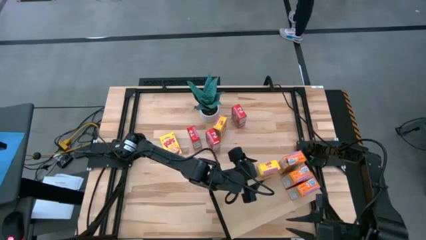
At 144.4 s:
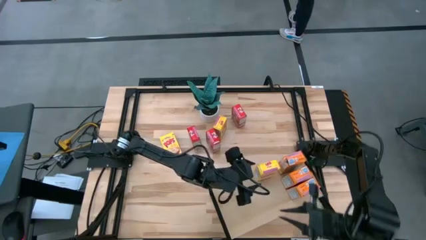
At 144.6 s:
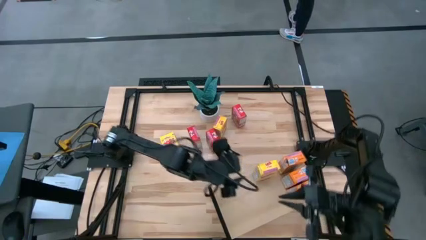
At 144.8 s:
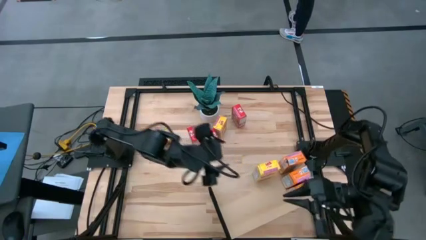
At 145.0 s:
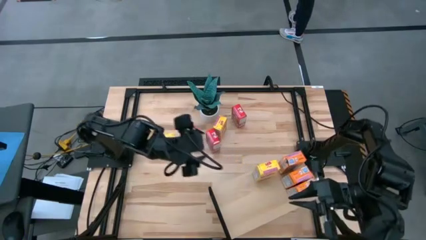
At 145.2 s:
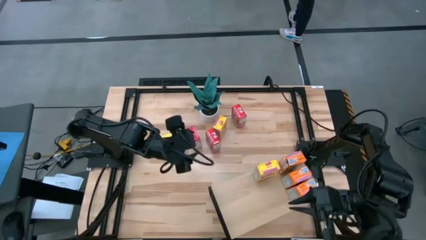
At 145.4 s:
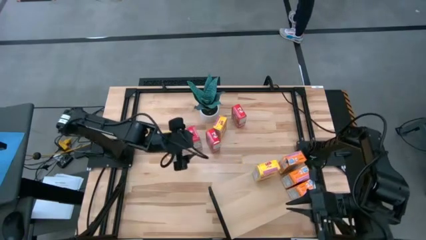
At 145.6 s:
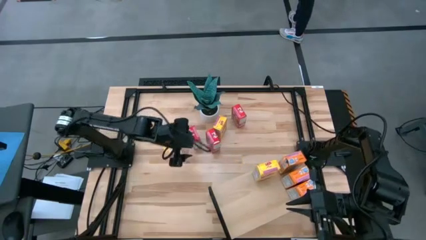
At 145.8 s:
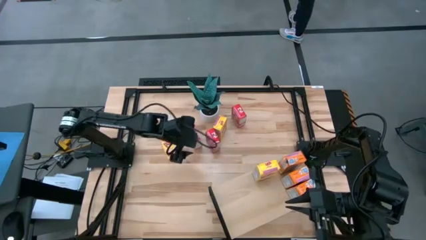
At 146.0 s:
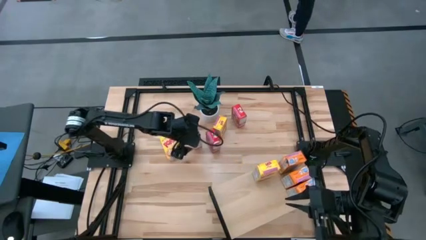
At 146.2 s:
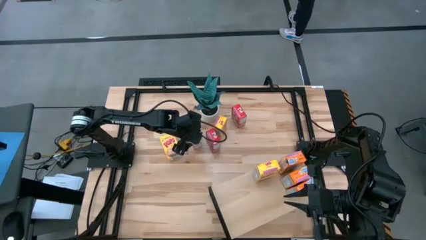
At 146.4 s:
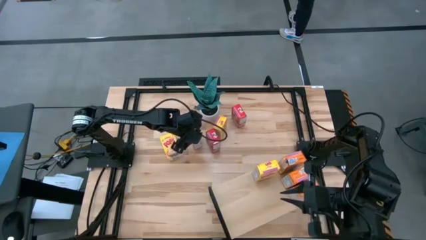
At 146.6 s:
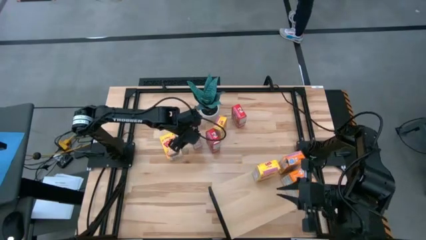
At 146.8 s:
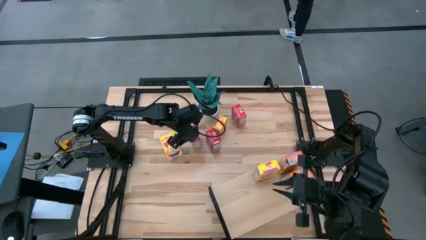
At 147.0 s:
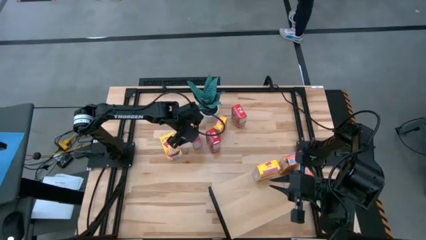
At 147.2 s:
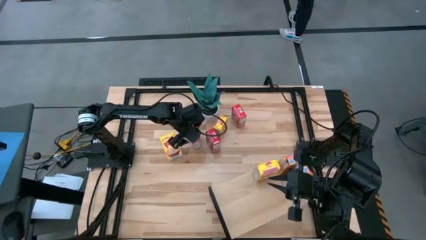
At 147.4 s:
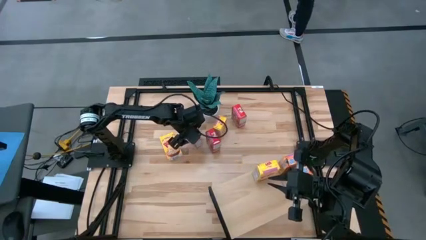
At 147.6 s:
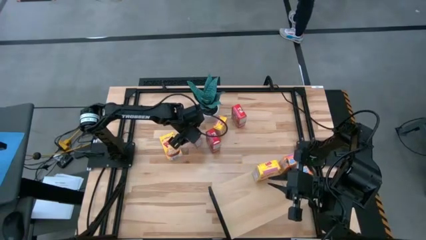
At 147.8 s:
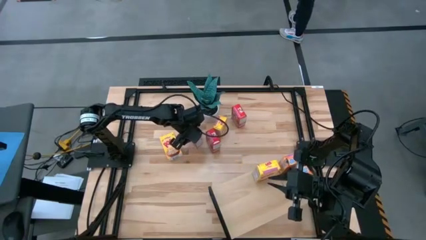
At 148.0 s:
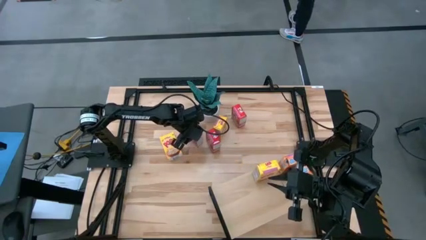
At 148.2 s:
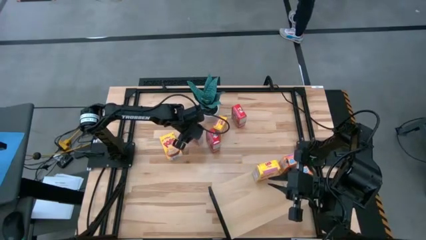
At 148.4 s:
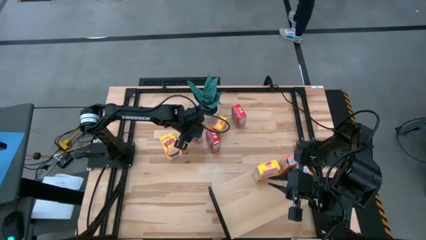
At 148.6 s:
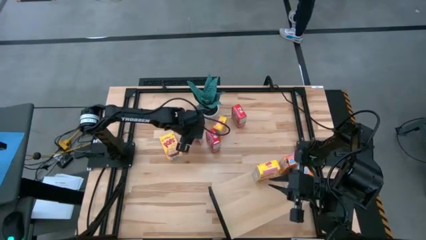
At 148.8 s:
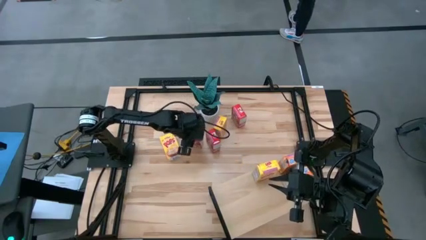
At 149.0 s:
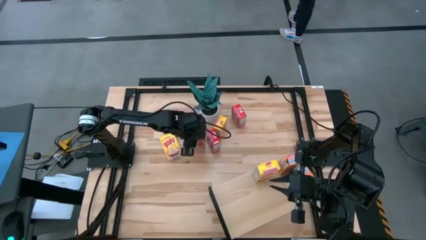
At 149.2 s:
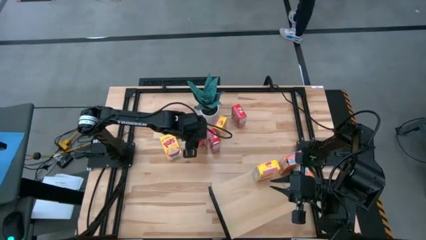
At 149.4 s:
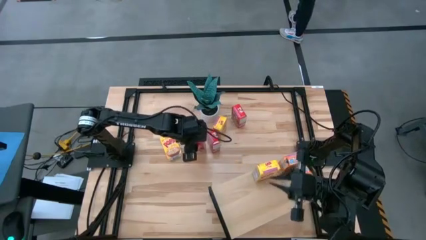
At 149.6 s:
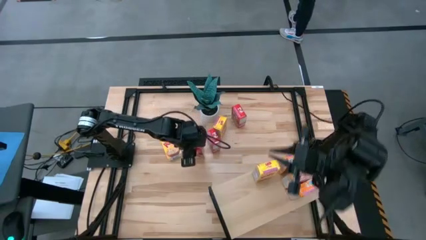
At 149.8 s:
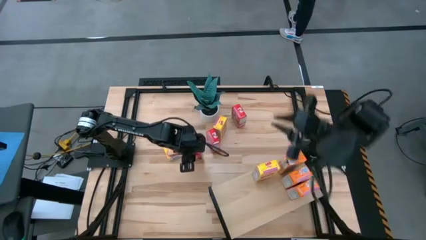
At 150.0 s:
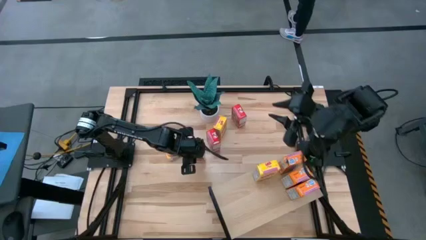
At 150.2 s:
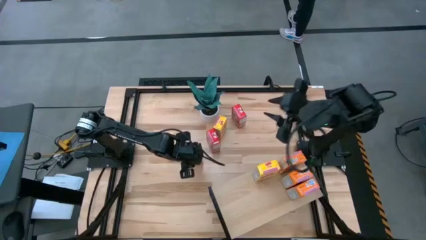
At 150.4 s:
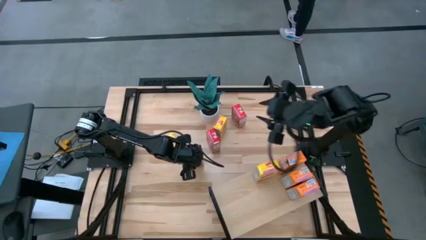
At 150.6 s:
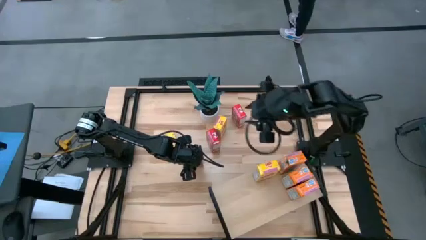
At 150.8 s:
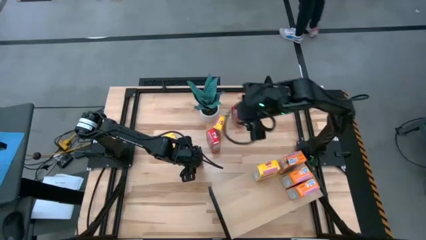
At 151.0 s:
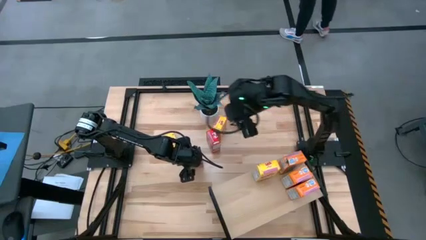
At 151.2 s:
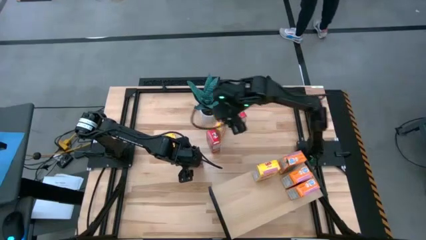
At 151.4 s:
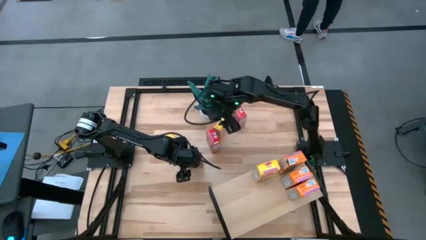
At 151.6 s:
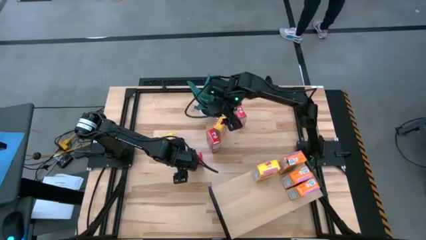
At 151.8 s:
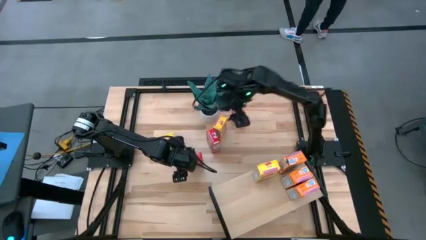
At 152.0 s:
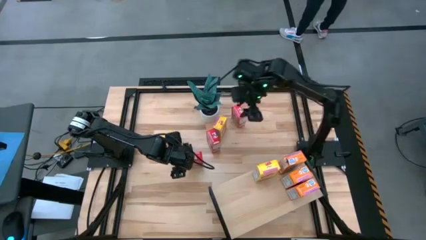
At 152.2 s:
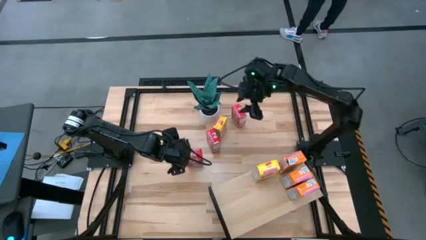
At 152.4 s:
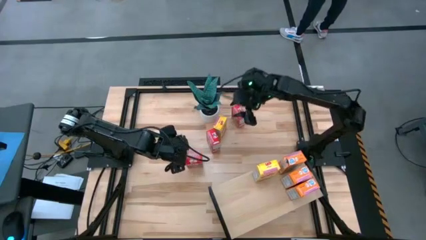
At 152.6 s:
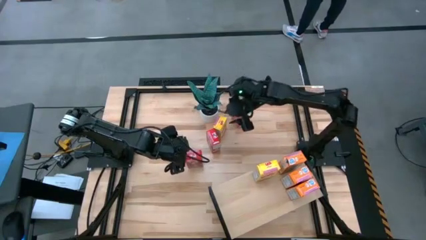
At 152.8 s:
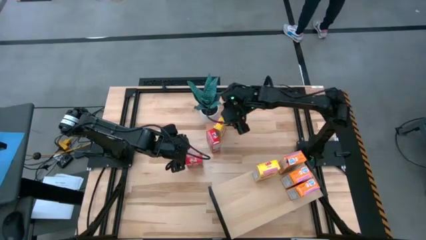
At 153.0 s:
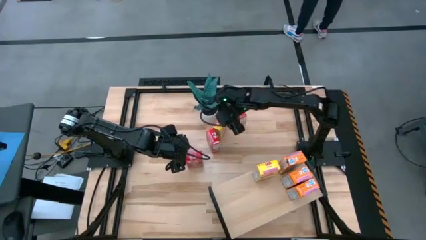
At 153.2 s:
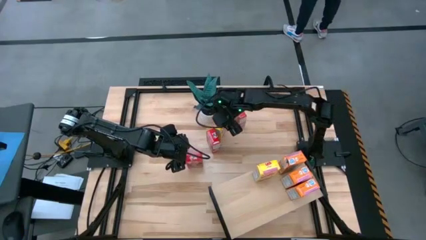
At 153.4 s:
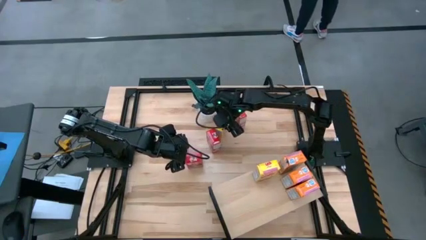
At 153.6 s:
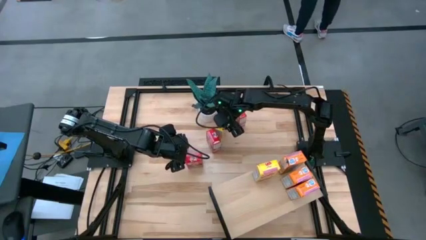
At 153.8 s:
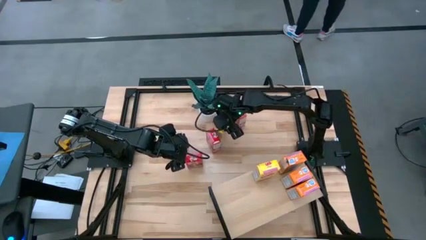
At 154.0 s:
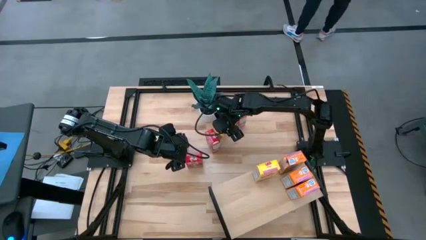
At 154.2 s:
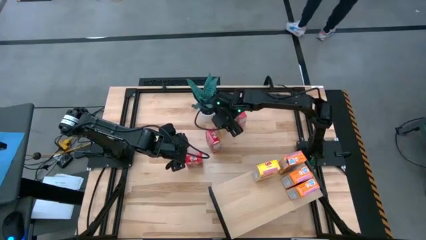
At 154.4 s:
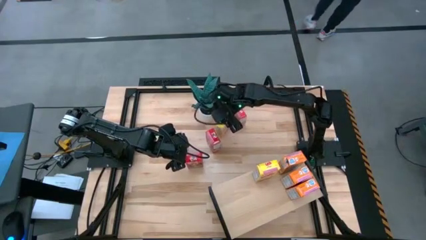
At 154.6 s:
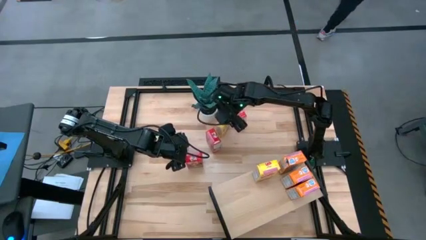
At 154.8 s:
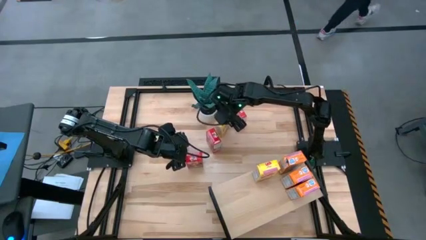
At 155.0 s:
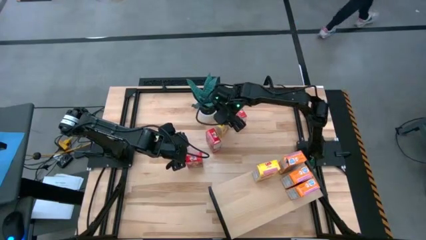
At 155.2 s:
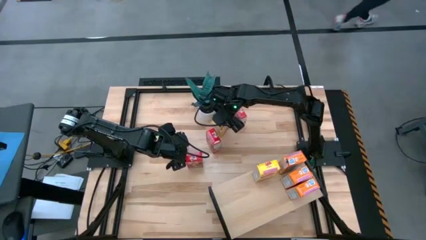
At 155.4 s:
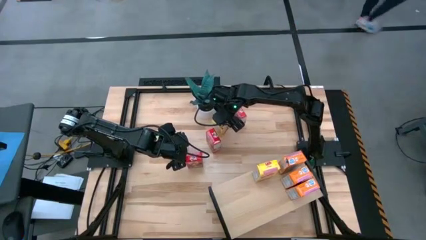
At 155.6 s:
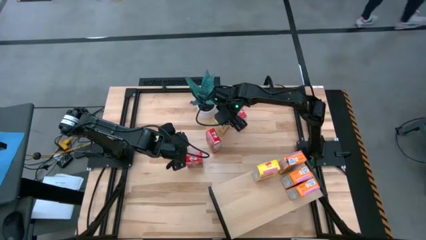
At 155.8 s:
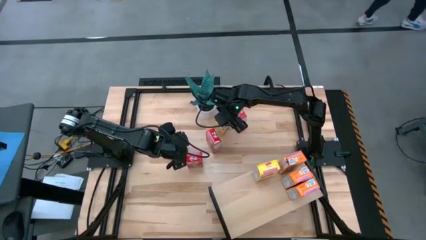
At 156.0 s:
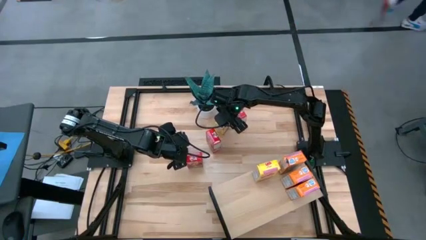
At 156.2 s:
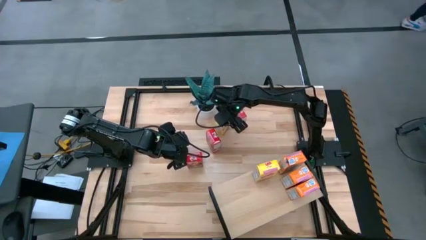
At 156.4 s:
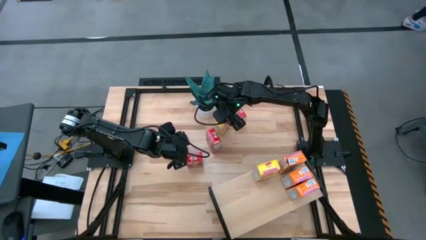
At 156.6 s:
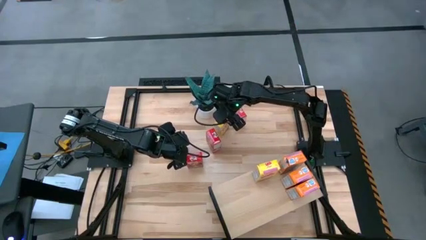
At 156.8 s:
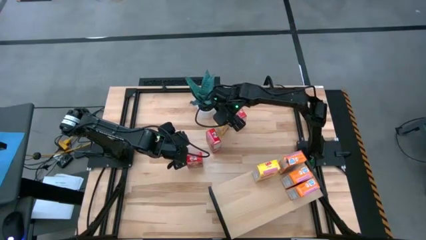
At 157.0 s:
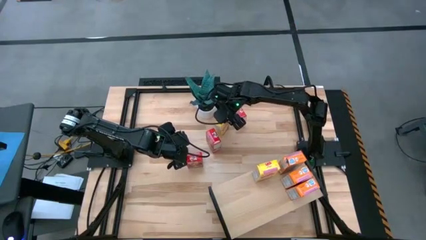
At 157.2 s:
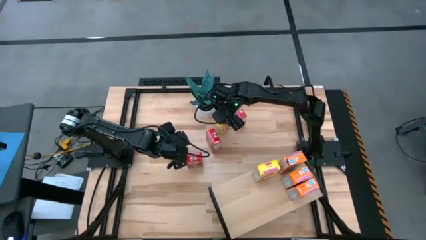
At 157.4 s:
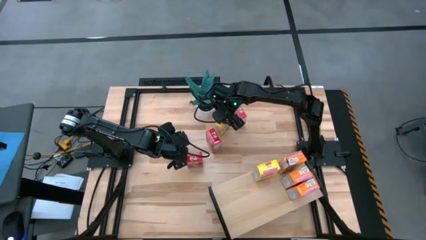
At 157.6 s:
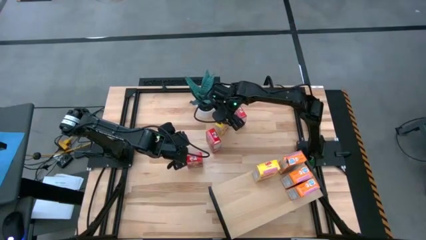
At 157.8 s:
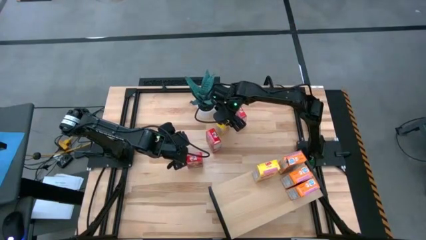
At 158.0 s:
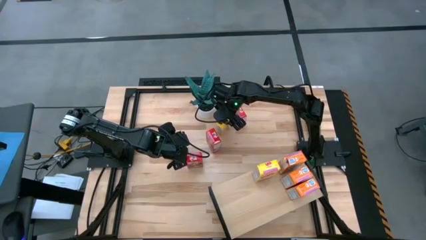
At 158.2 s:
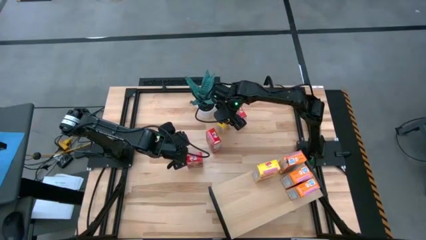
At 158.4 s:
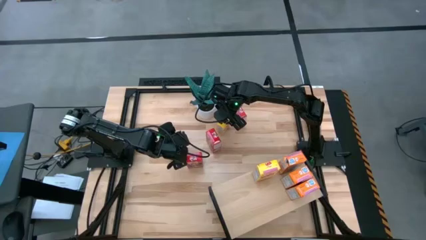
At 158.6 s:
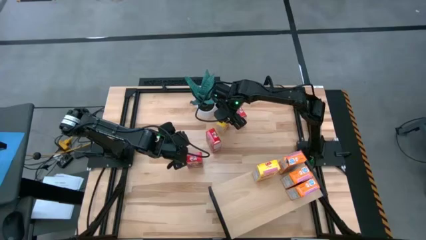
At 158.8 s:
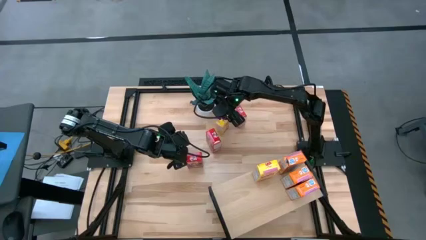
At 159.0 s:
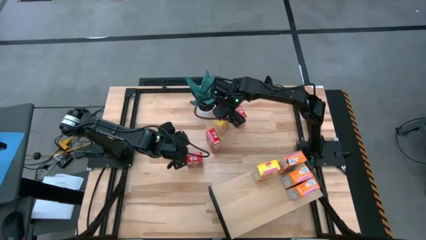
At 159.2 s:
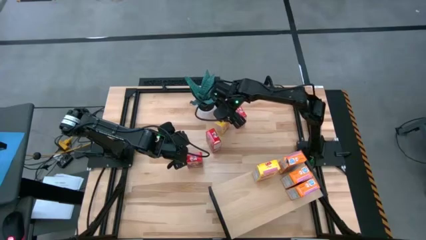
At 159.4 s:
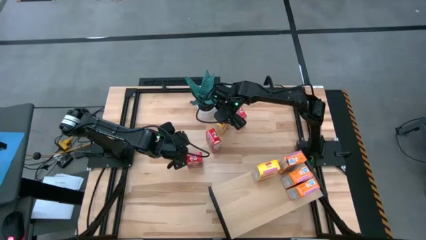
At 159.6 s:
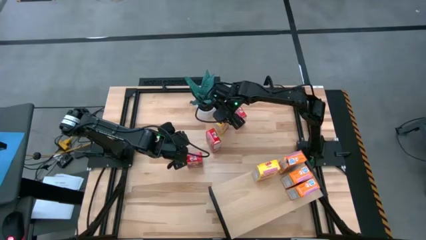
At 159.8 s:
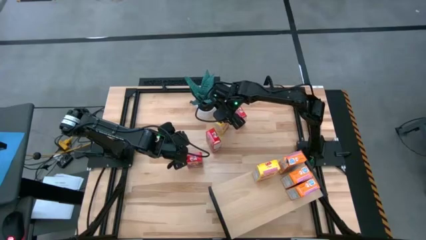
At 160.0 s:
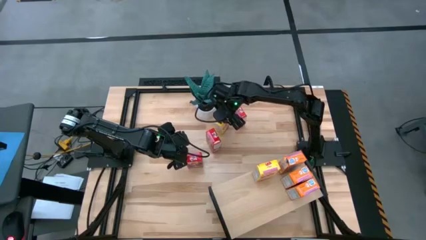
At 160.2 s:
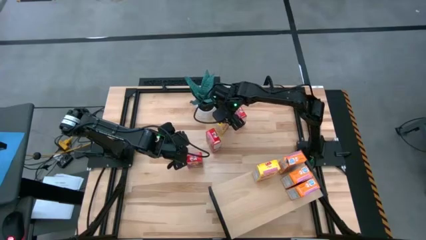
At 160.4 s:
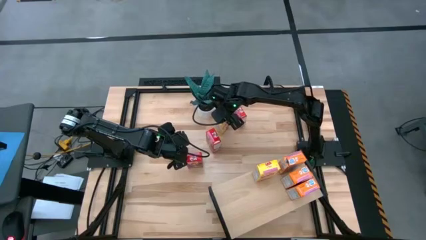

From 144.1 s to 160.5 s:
Task: Stack cereal on shelf
Put the right yellow cereal box on the shelf aligned with the other yellow cereal box
